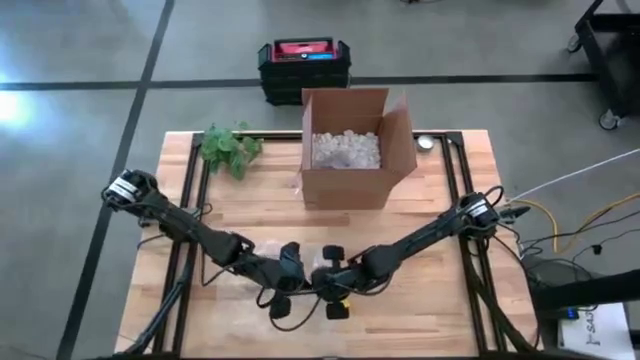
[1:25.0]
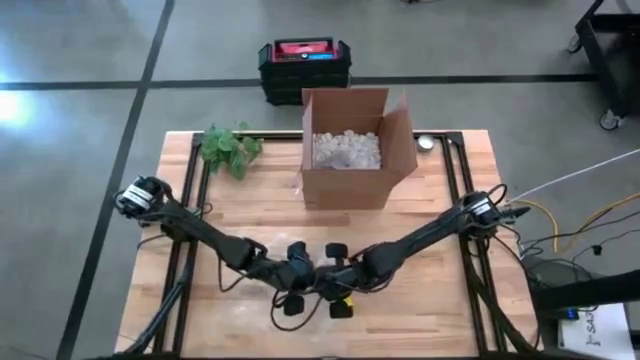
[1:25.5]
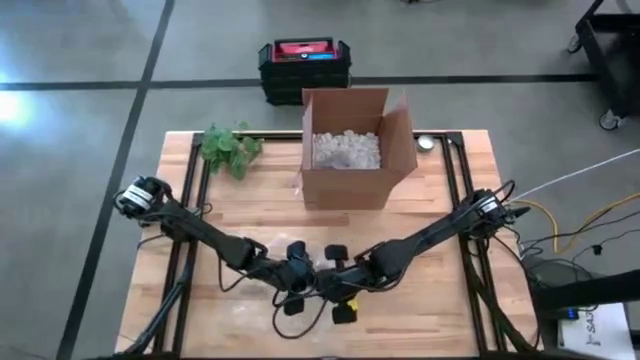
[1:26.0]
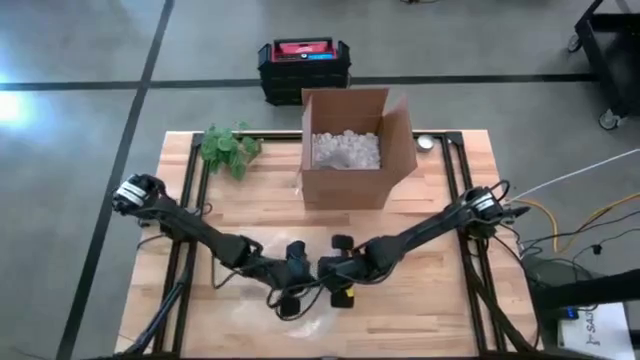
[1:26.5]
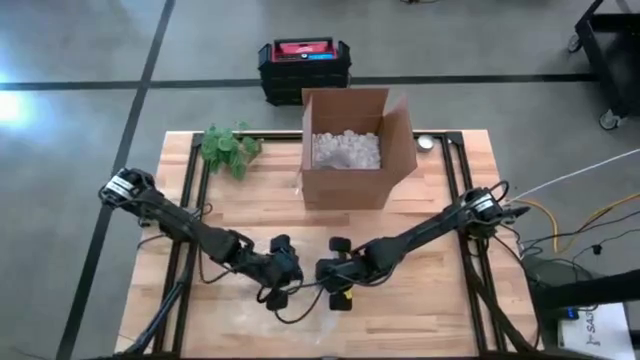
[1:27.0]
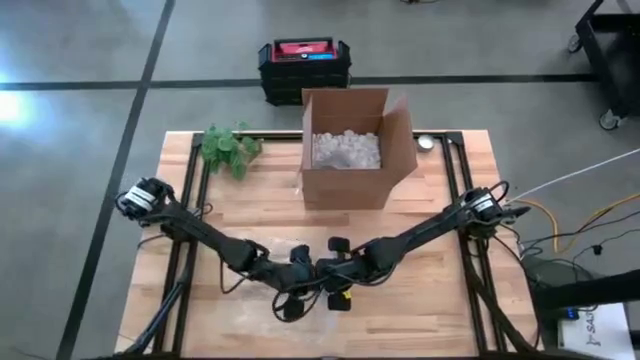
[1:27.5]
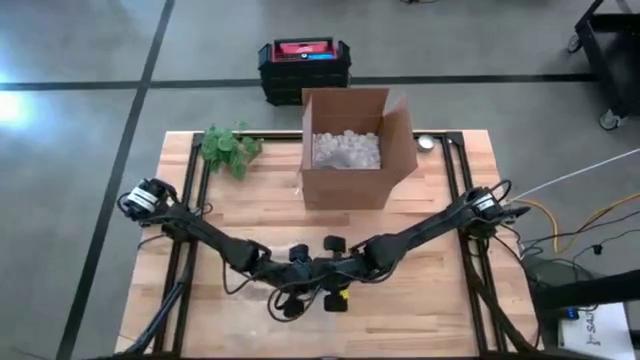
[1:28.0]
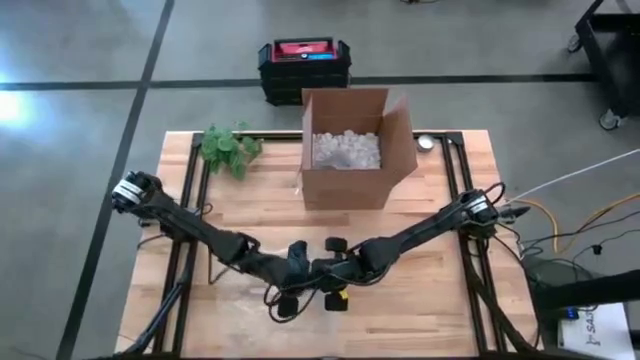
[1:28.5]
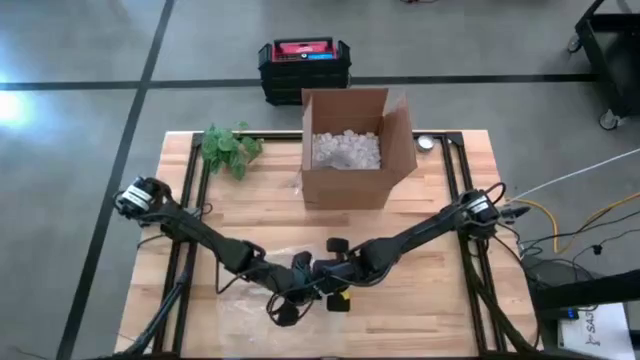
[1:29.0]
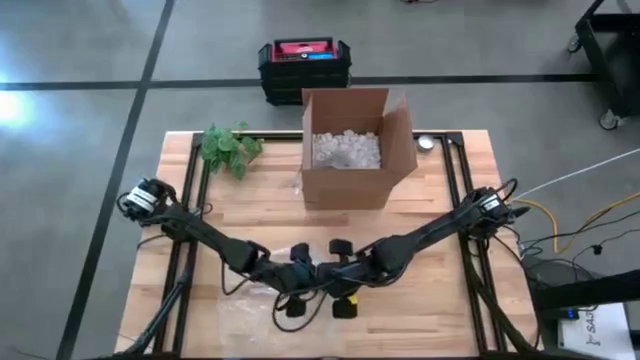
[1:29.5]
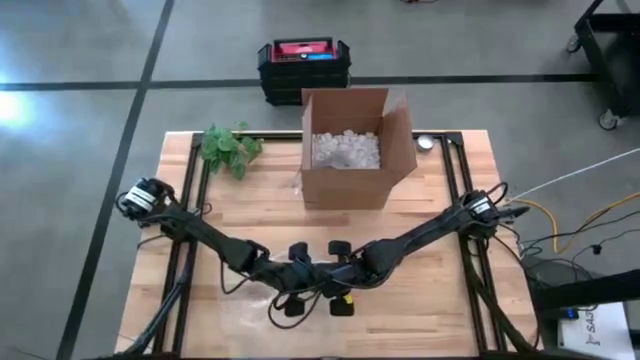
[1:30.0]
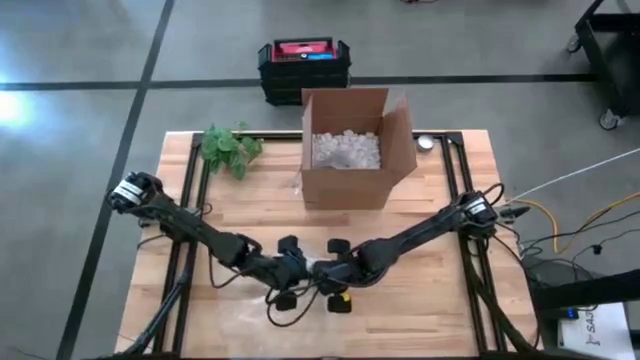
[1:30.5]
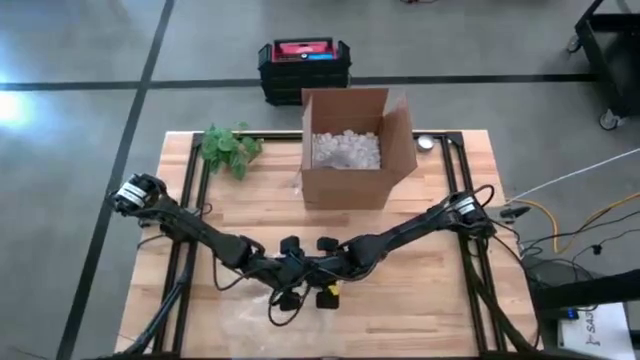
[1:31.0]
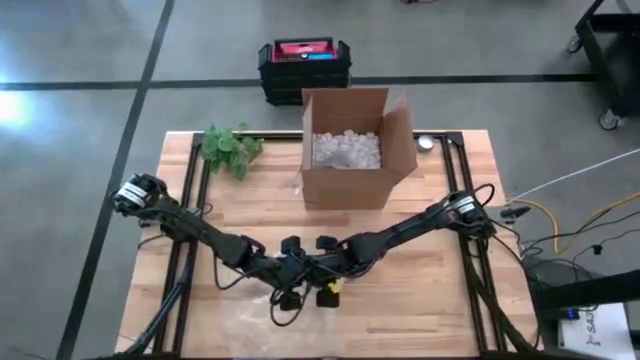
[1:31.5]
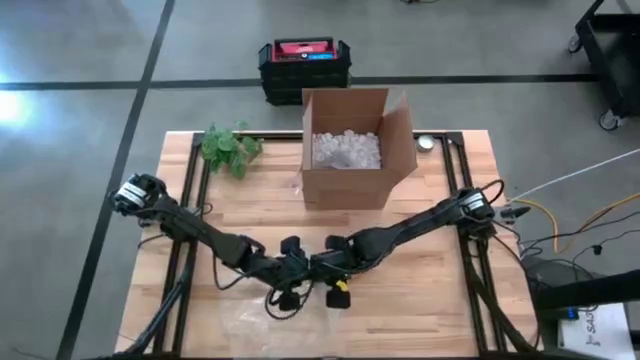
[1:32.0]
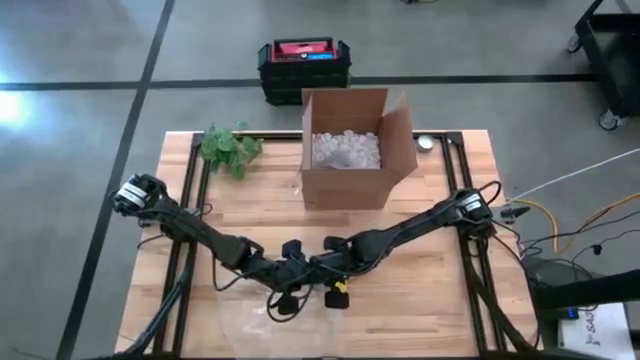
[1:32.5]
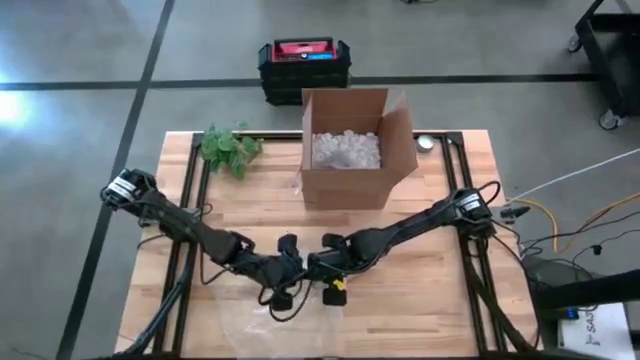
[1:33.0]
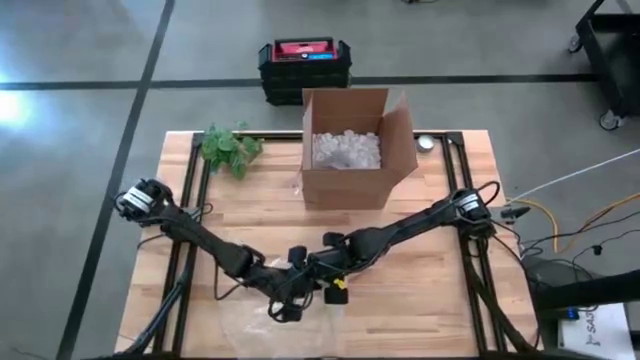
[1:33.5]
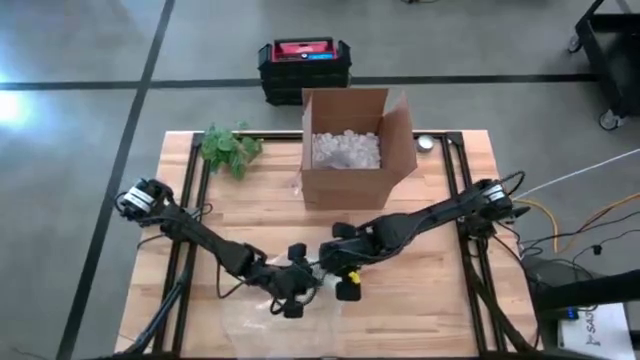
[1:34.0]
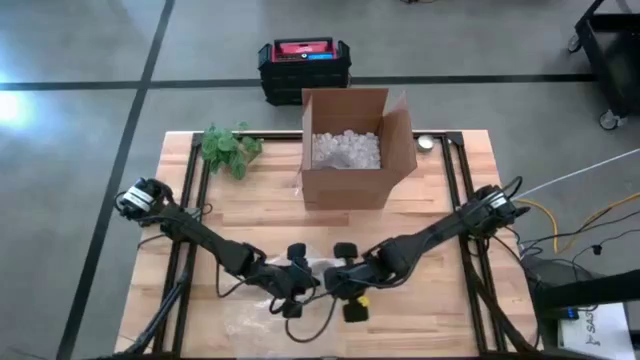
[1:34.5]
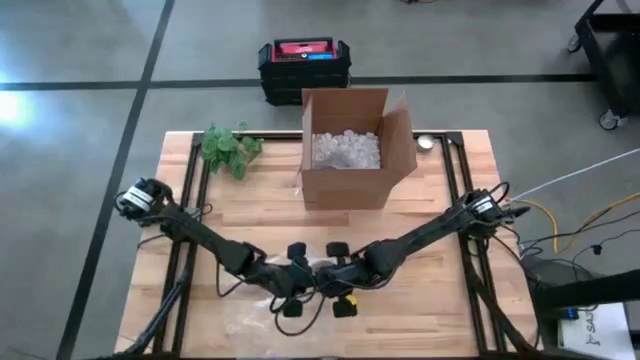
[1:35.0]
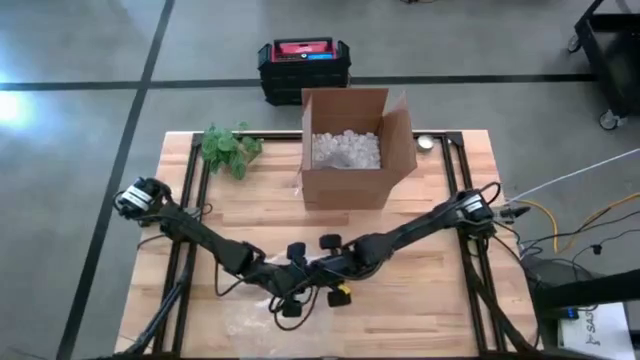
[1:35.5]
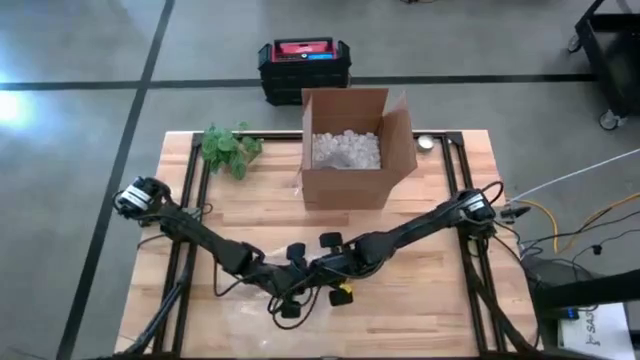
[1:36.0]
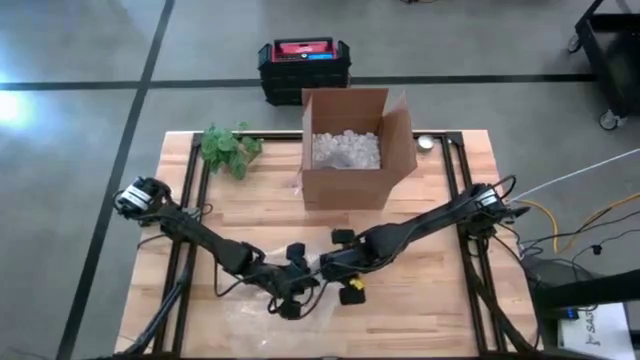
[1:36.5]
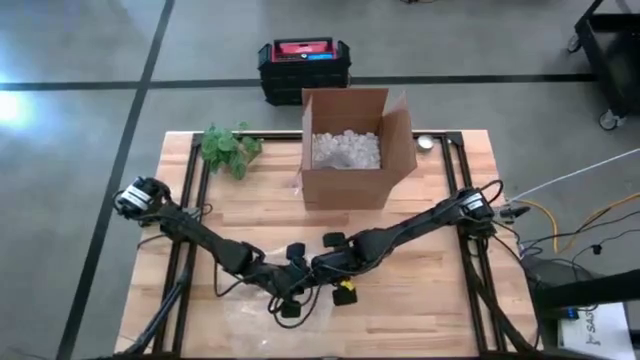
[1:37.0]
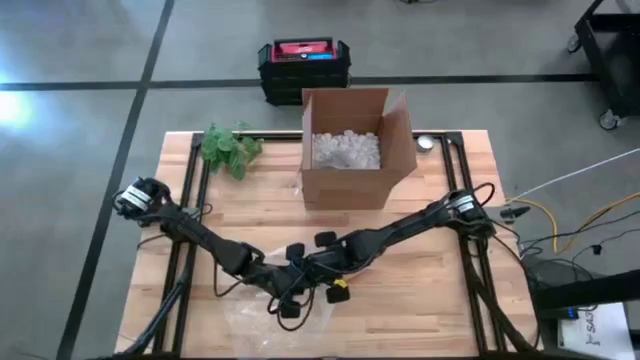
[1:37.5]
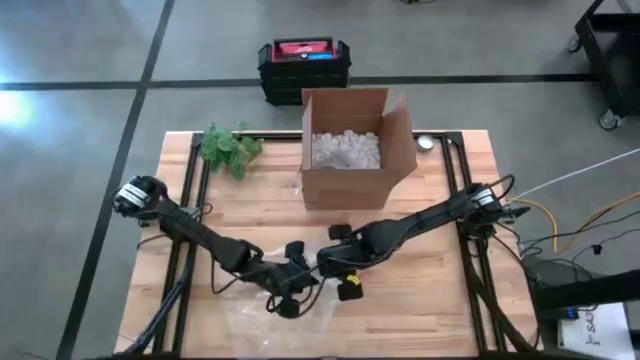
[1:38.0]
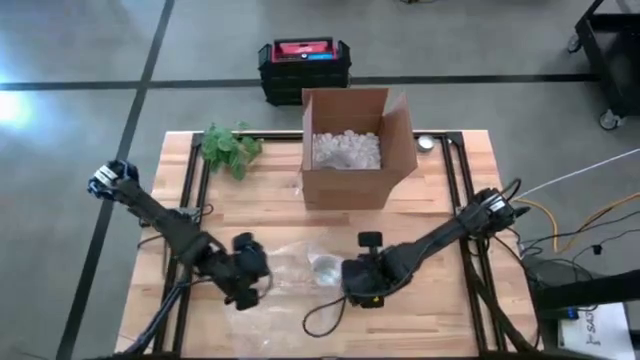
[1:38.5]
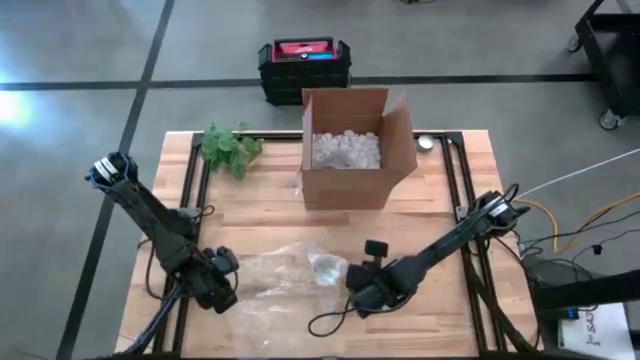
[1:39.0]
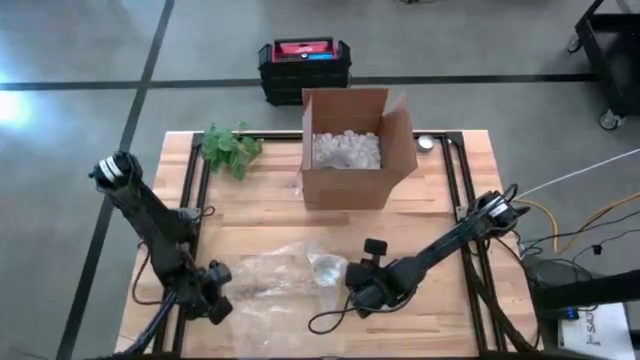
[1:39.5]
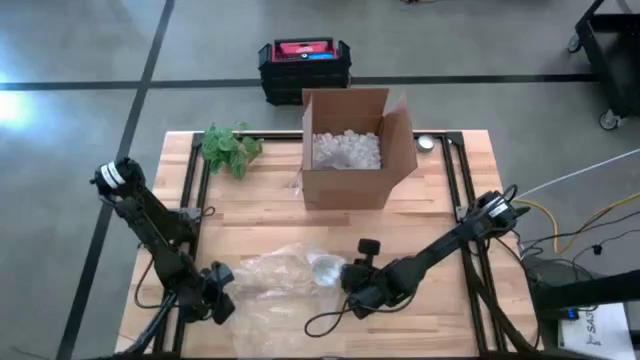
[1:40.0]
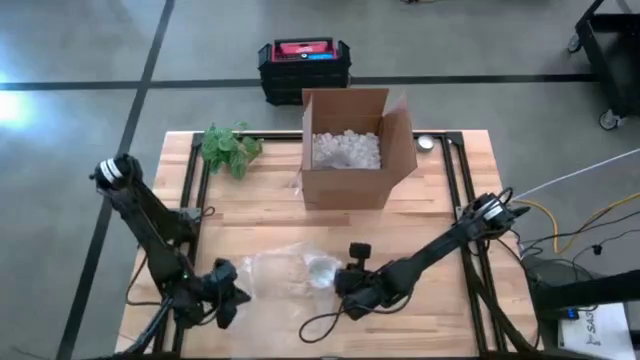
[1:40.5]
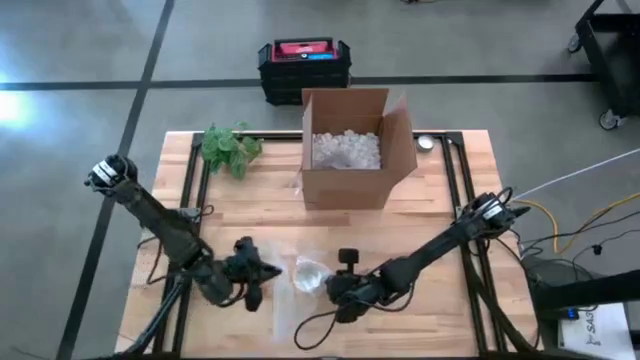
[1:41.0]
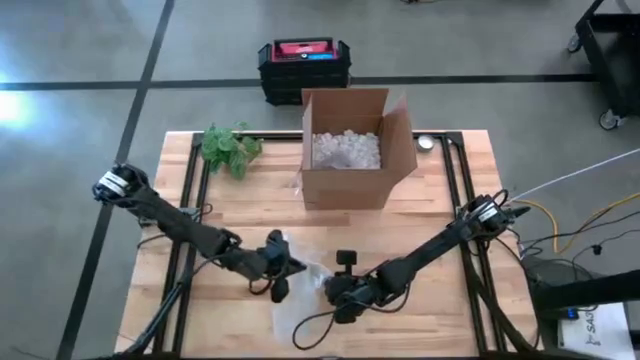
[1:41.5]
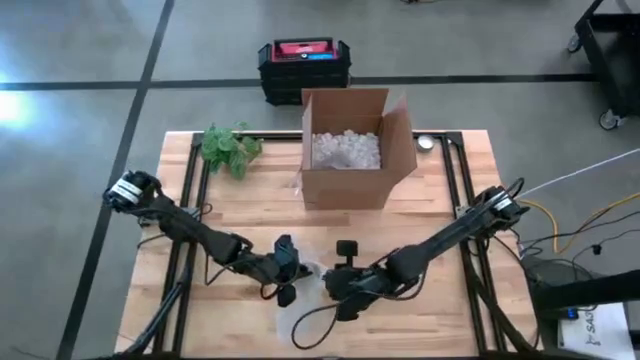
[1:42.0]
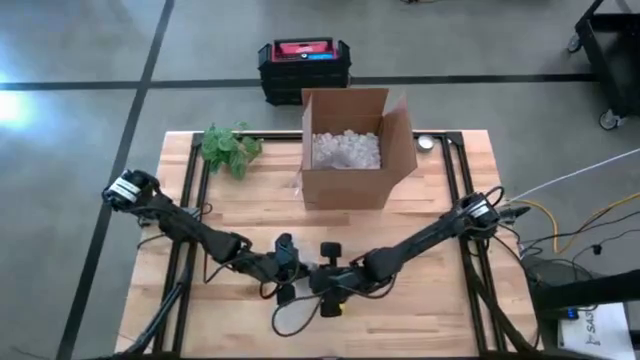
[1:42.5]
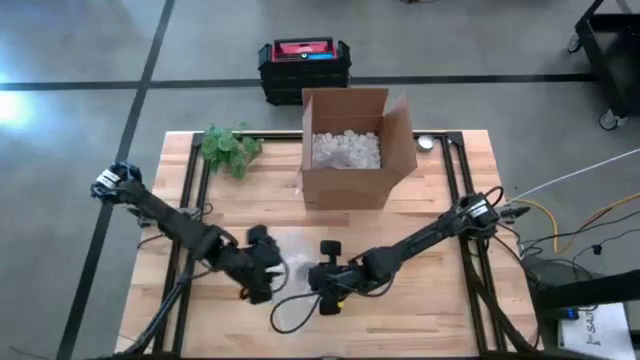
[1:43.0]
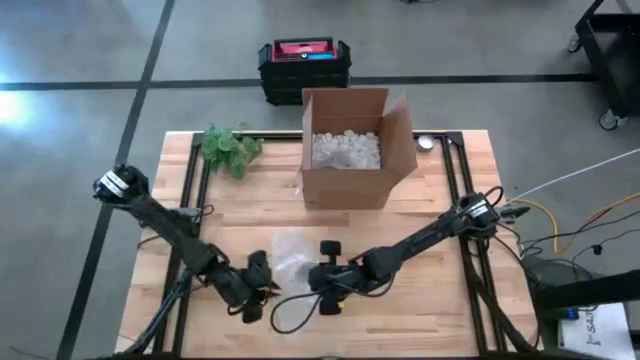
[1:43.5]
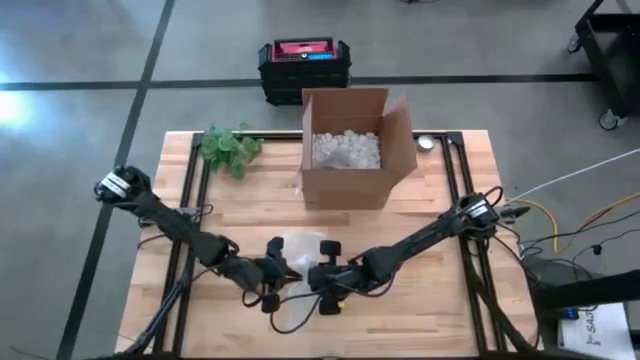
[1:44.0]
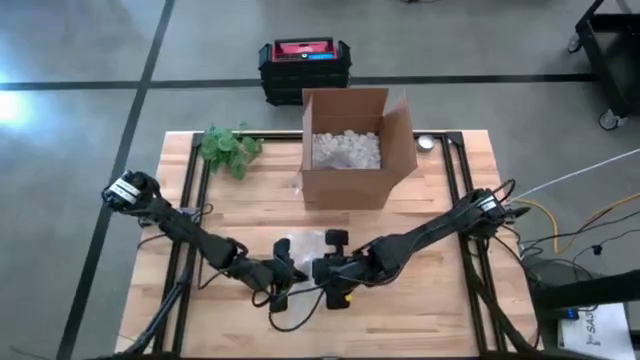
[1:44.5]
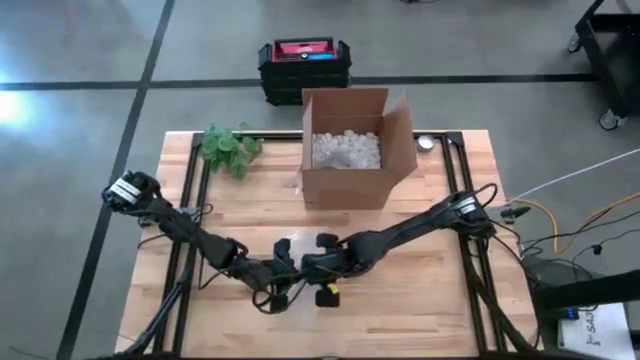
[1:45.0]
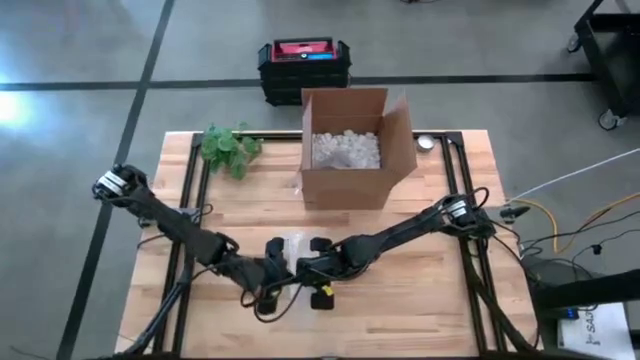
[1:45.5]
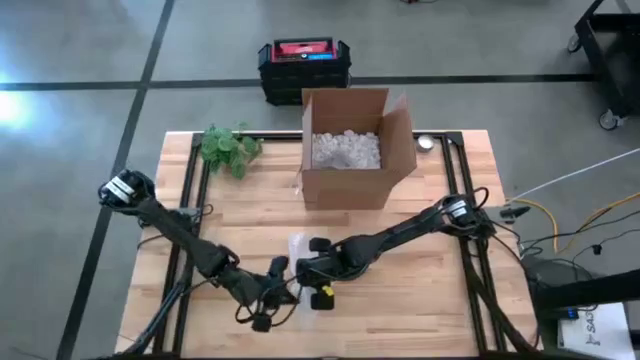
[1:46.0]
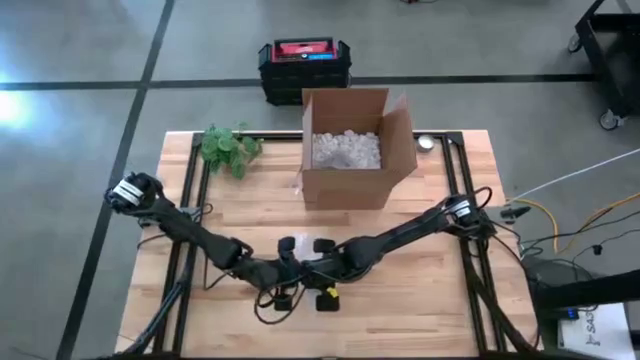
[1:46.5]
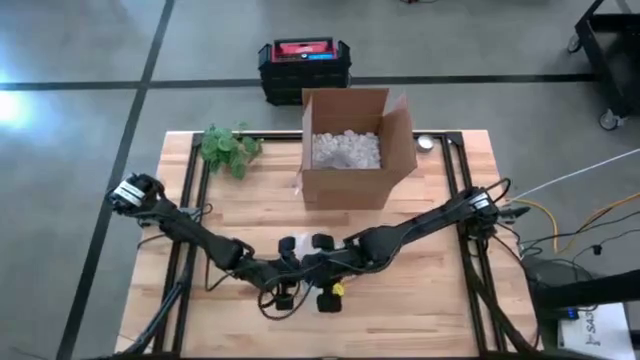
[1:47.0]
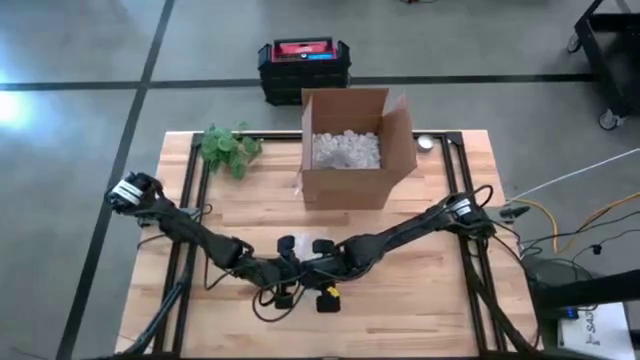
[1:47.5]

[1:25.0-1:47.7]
Task: wrap mug
Wrap the yellow mug with bubble wrap
